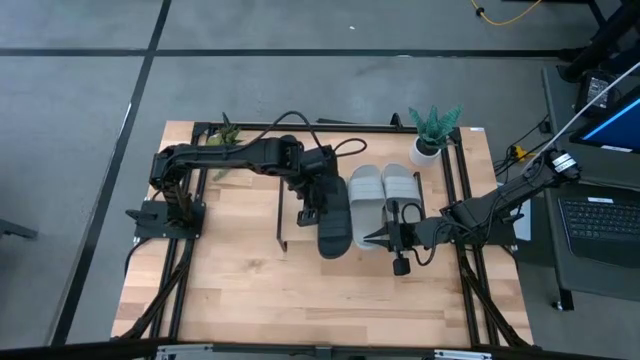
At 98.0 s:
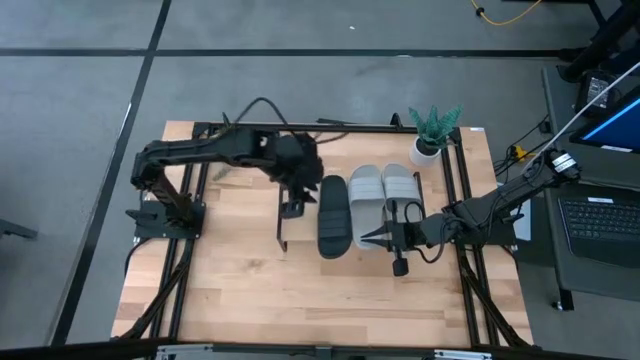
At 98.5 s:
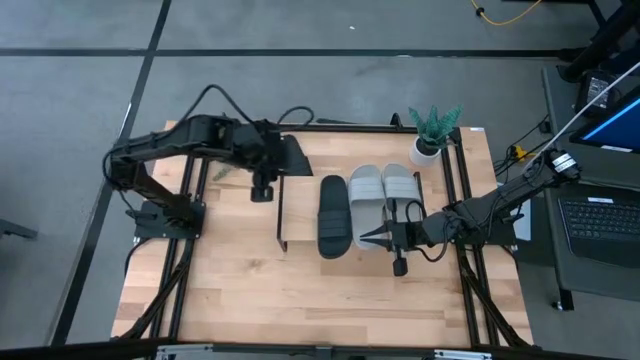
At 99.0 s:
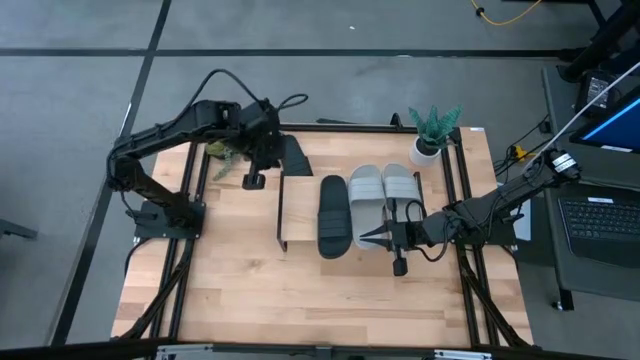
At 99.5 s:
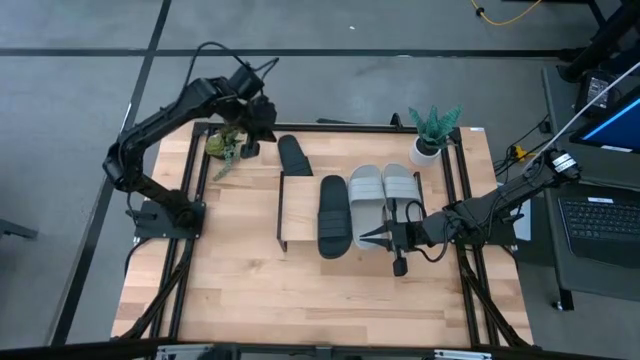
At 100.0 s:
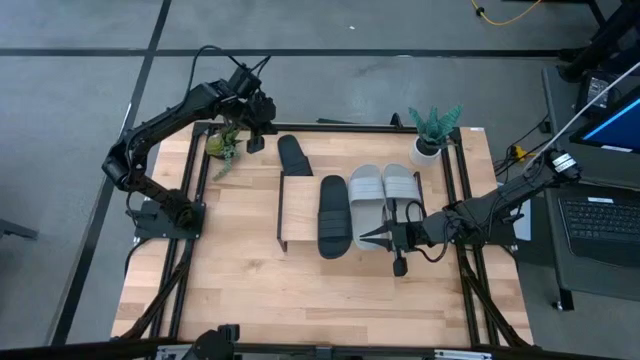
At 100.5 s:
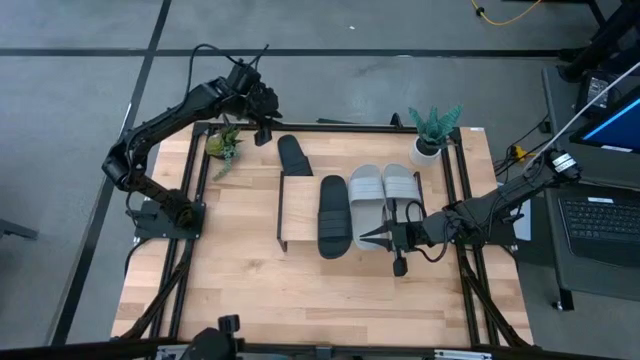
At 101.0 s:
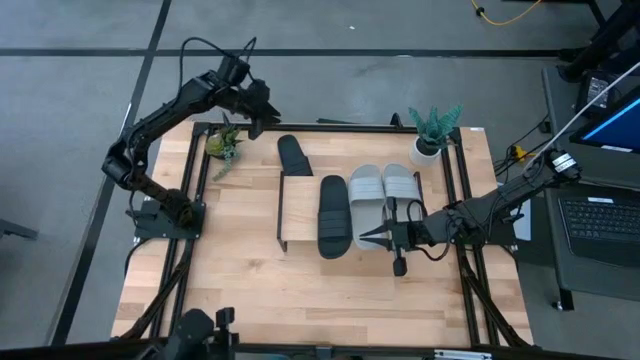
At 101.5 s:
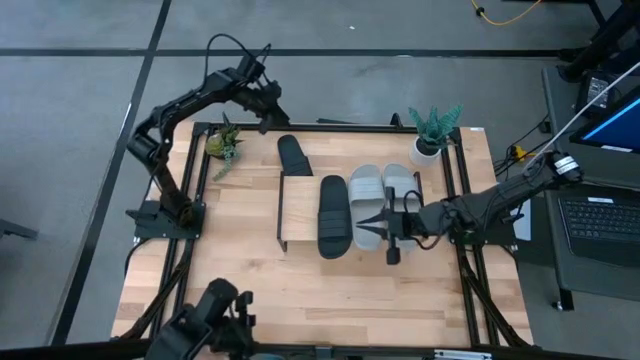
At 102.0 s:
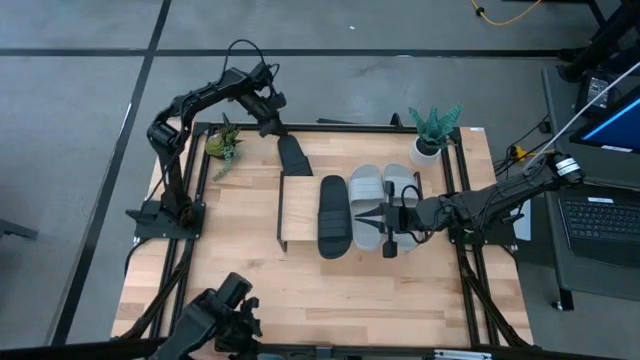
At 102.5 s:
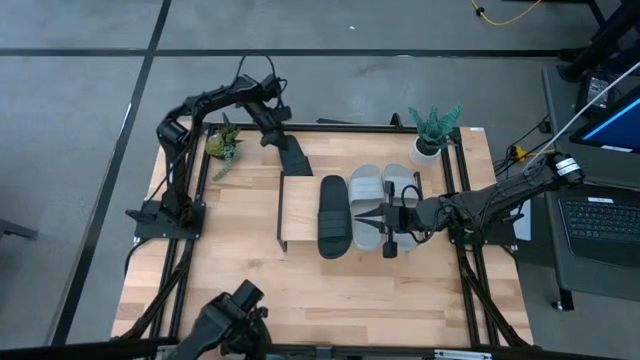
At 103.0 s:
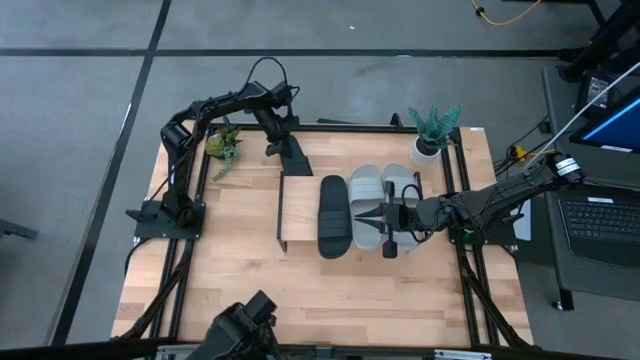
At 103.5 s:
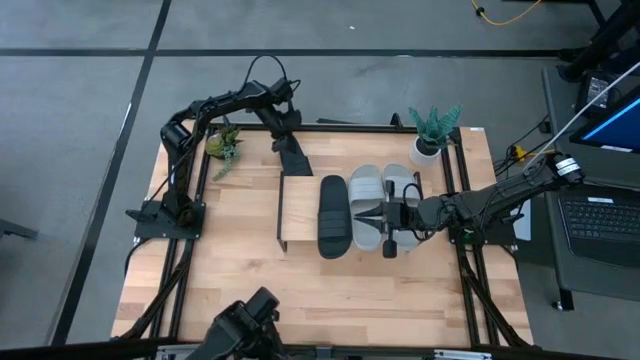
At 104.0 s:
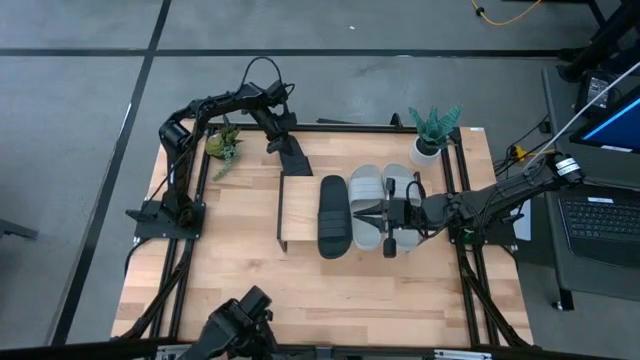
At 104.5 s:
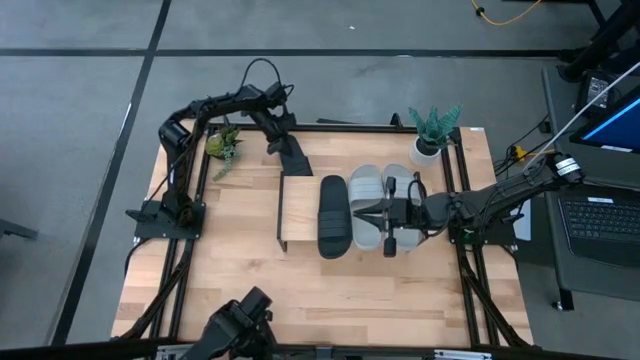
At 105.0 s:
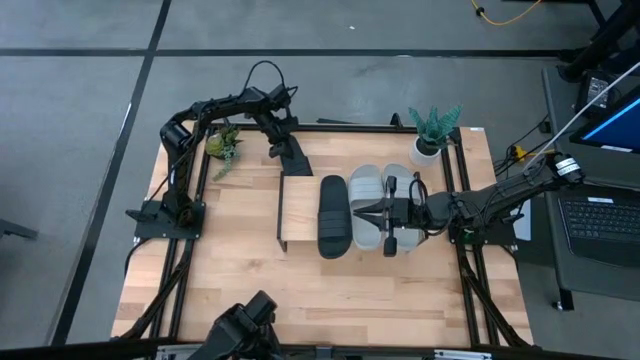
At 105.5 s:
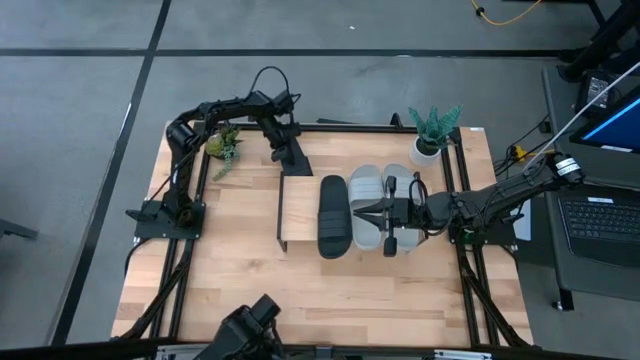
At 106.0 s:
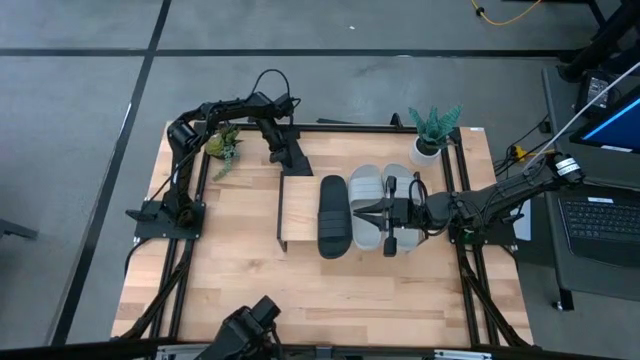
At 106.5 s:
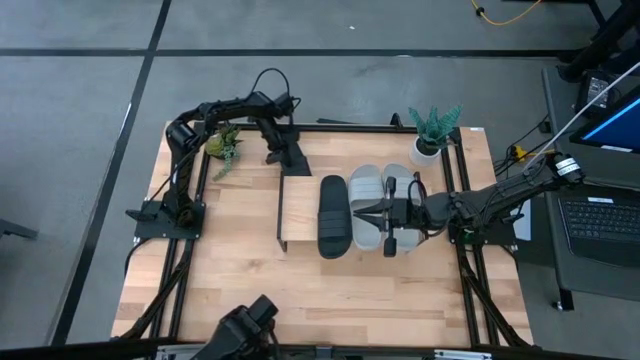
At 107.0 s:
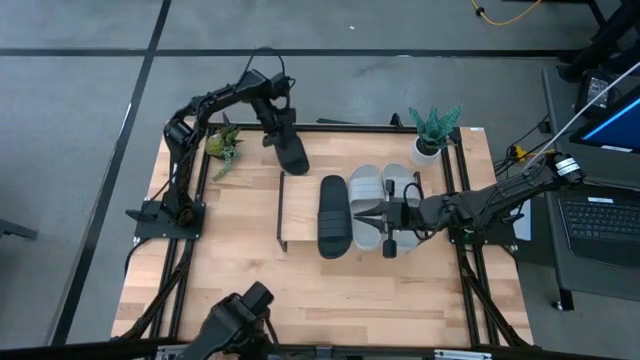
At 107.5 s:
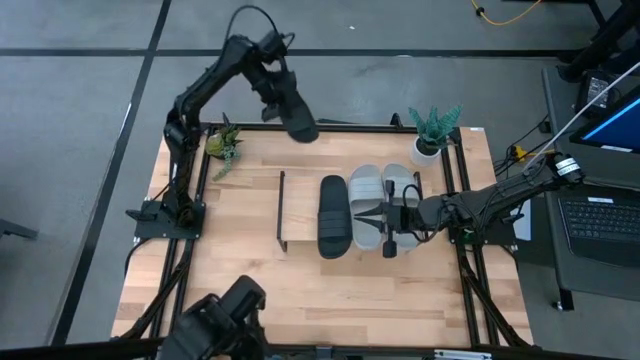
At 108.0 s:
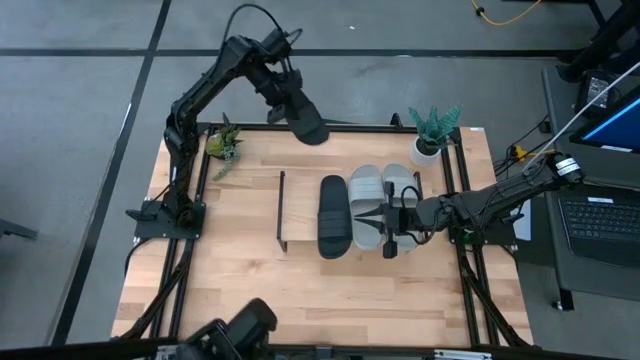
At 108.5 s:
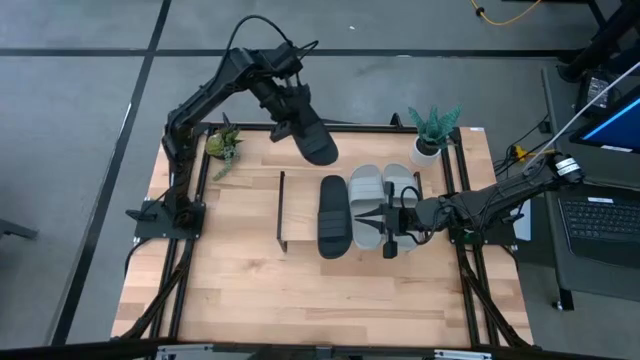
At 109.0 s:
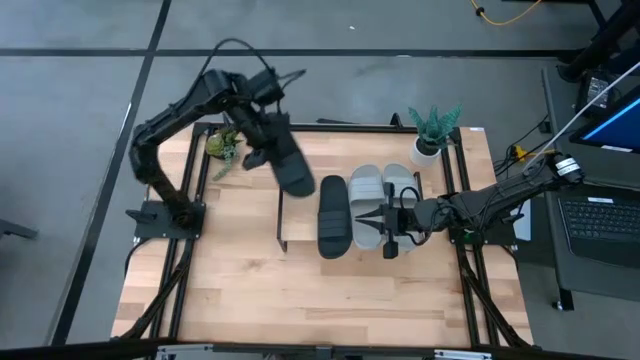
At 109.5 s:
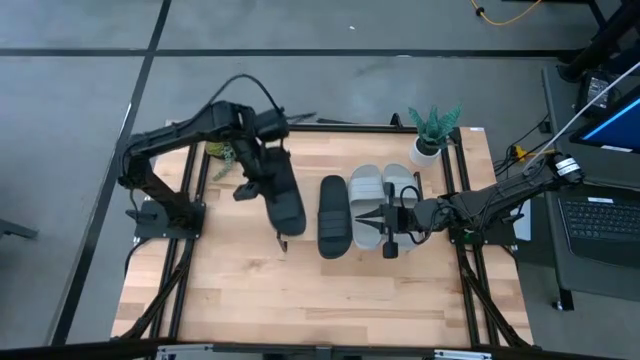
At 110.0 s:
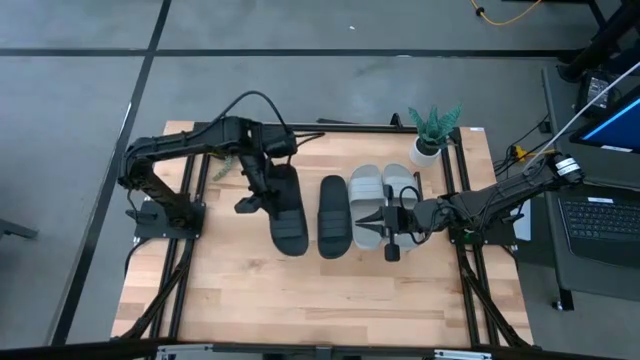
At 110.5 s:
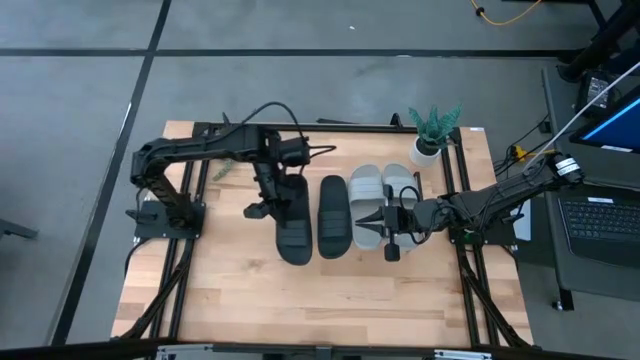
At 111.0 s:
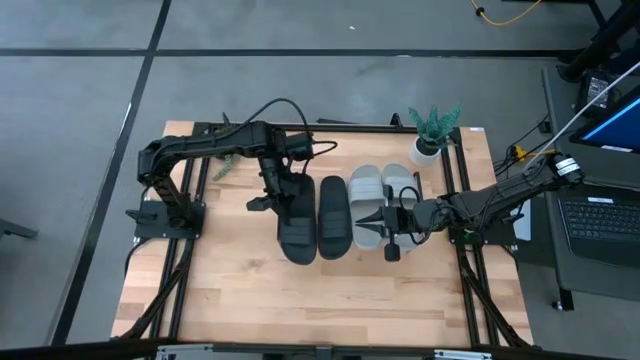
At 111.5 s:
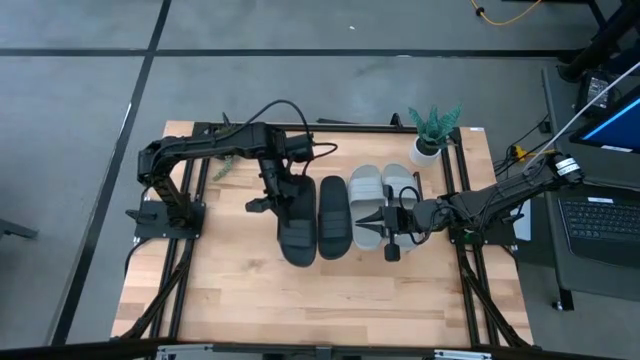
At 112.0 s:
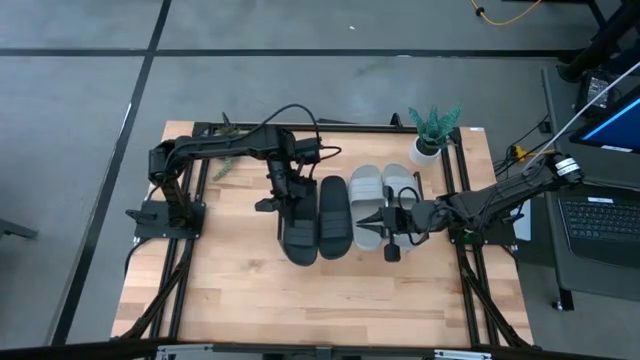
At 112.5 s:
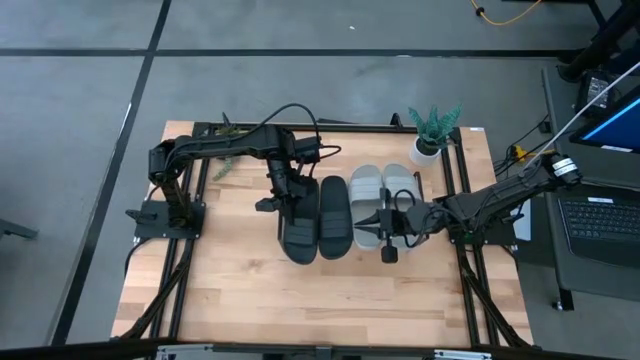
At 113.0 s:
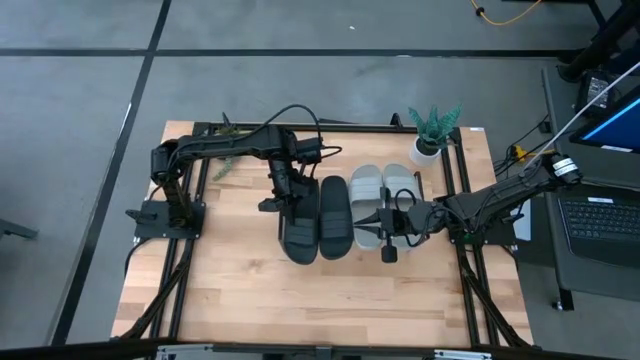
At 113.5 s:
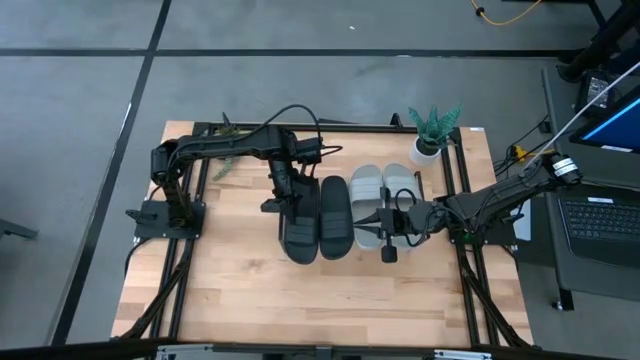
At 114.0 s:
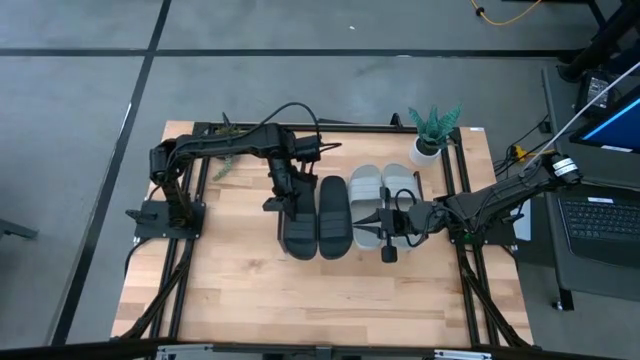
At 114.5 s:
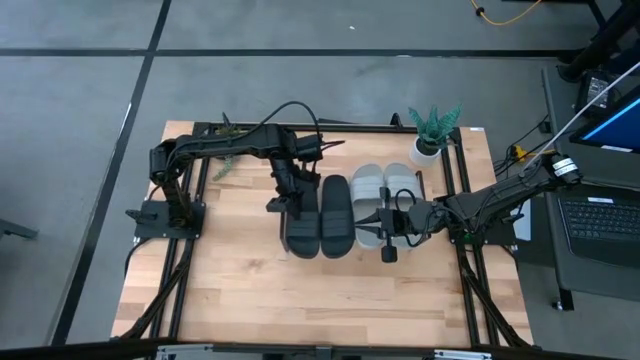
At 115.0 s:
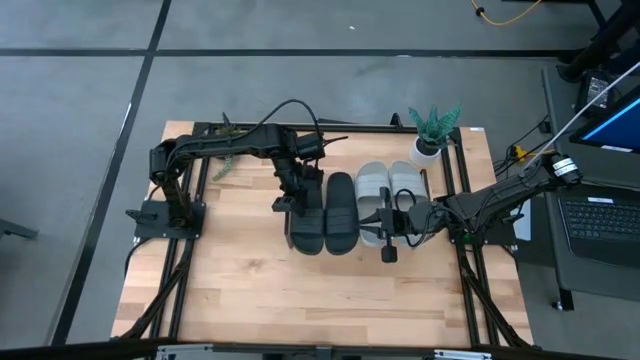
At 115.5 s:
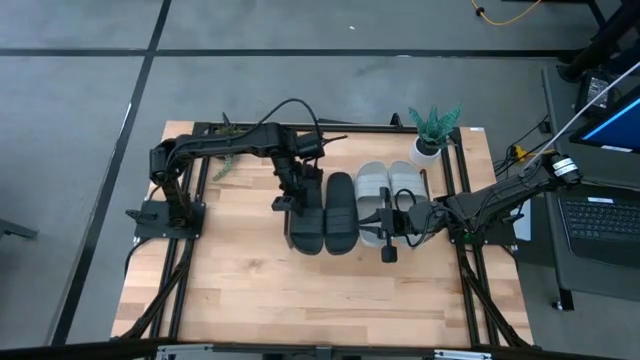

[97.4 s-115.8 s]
Task: Pick and place slides into the shelf
Put the black slide on the shelf

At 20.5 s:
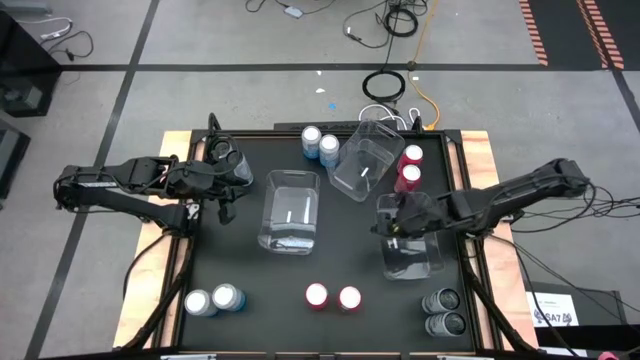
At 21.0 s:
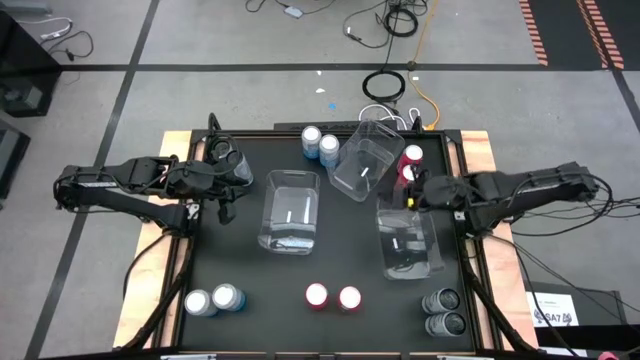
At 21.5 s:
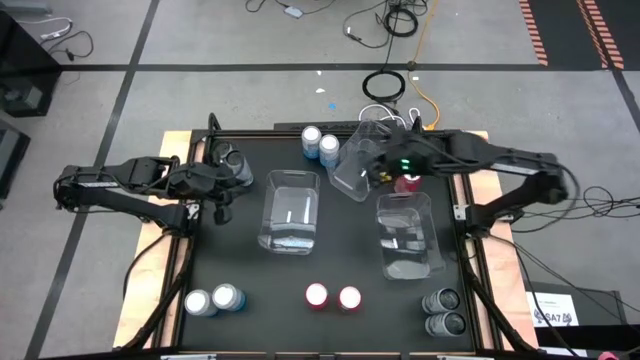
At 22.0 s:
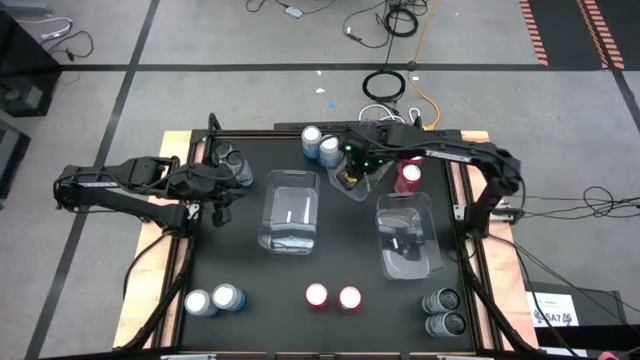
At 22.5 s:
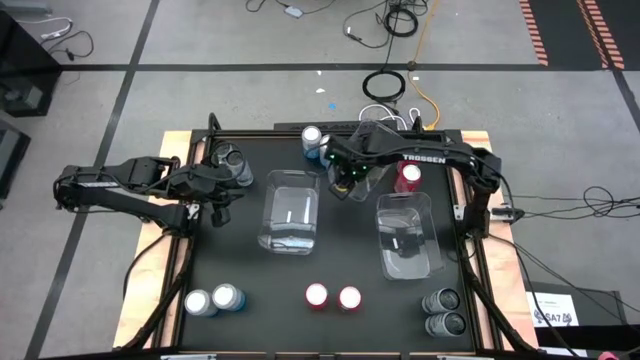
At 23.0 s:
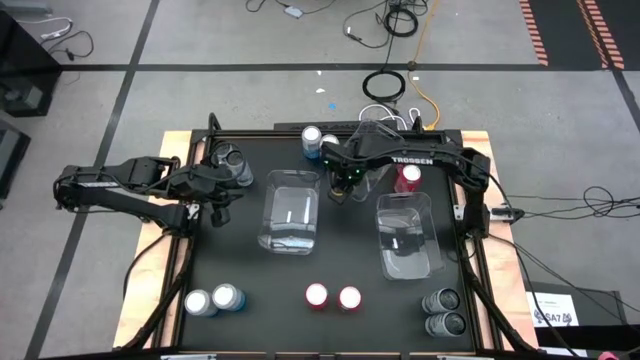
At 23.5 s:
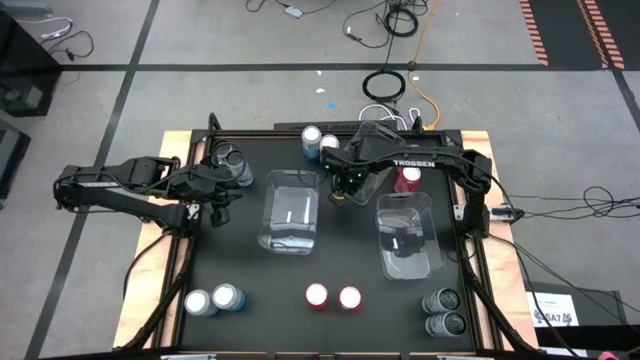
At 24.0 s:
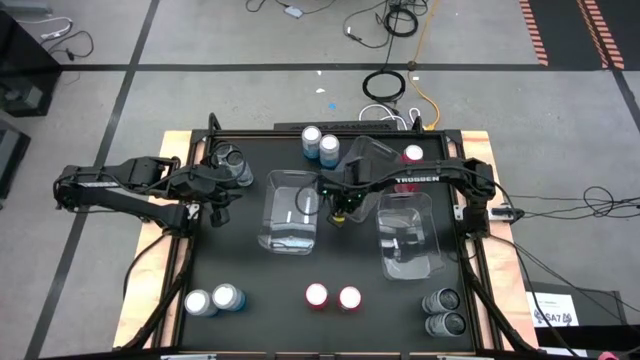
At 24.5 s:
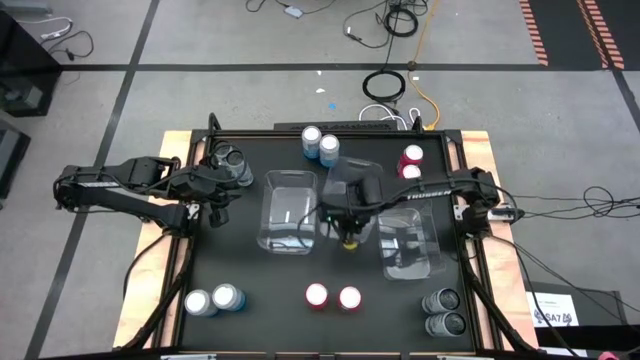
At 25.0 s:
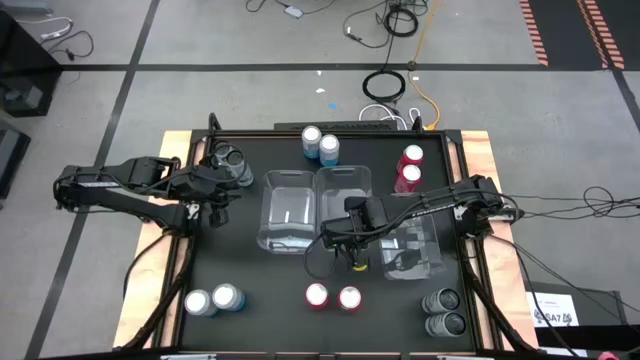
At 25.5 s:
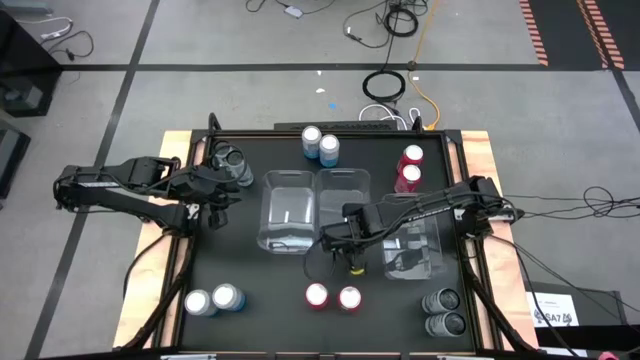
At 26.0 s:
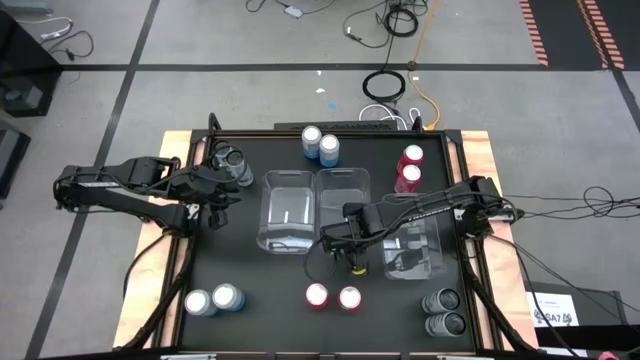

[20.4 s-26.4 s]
Task: Sort soda cans
Move the middle transparent bin to the right side of the center transparent bin
